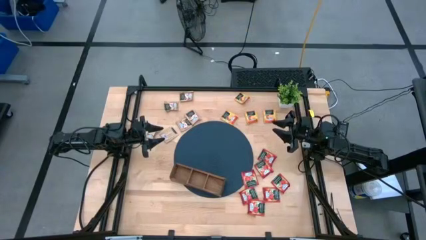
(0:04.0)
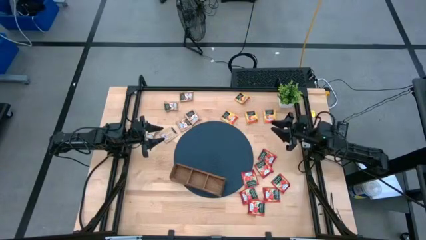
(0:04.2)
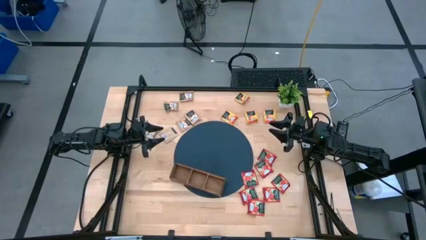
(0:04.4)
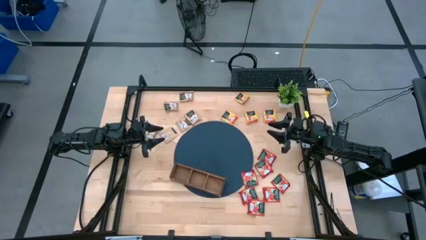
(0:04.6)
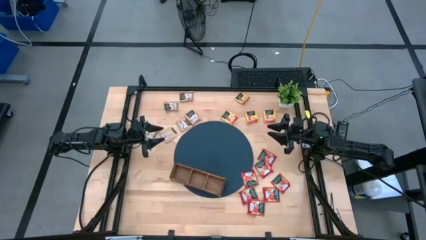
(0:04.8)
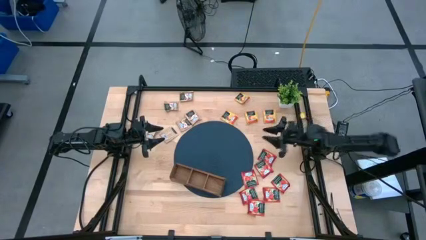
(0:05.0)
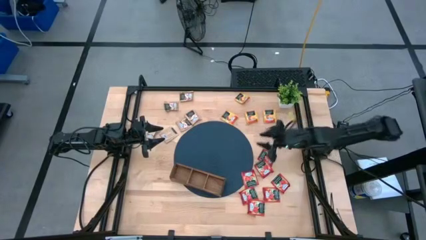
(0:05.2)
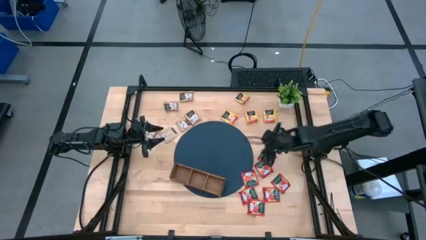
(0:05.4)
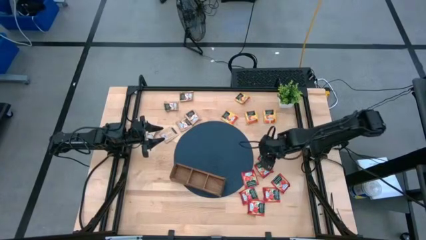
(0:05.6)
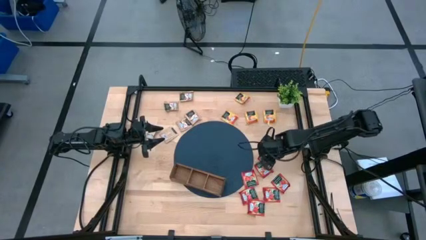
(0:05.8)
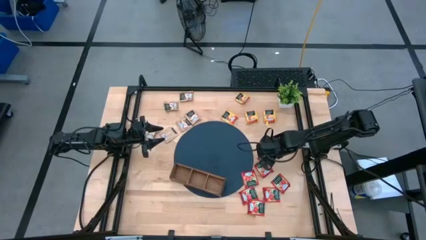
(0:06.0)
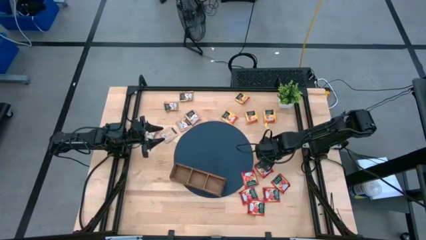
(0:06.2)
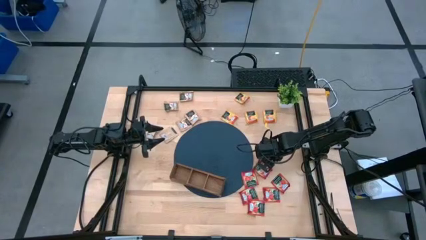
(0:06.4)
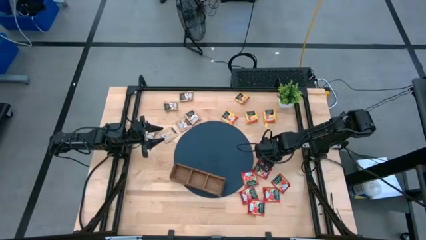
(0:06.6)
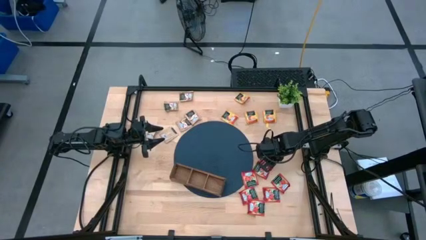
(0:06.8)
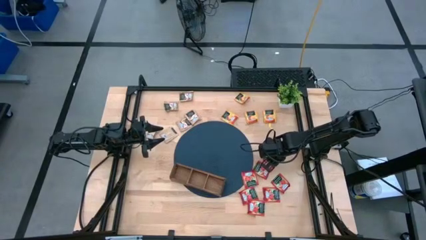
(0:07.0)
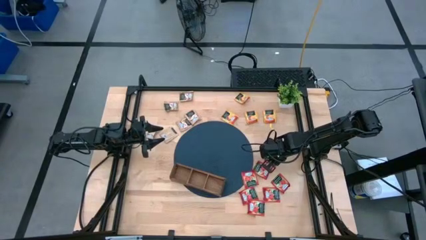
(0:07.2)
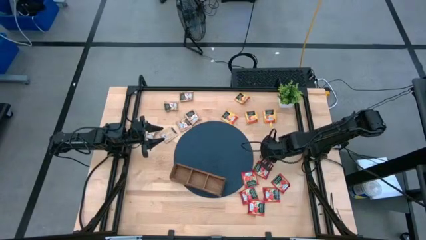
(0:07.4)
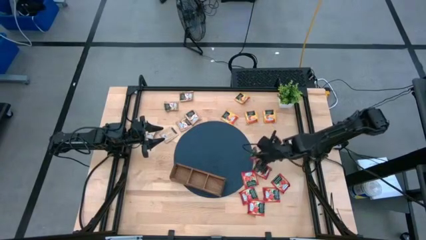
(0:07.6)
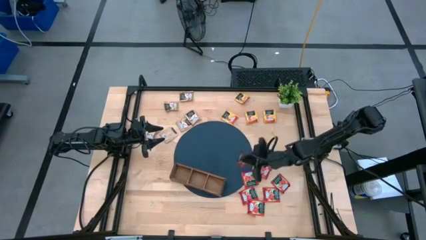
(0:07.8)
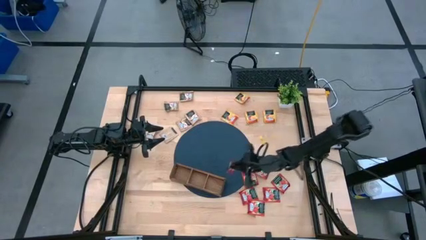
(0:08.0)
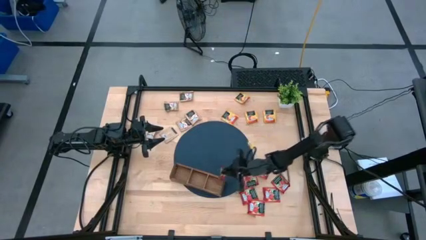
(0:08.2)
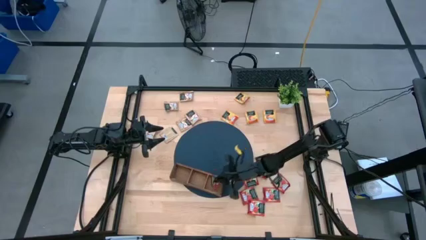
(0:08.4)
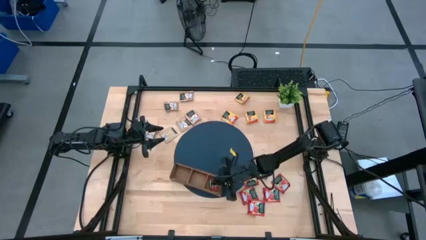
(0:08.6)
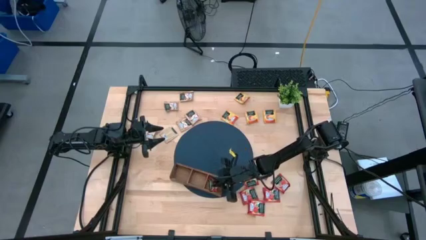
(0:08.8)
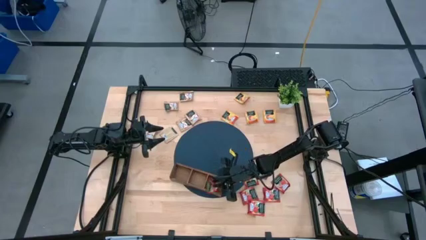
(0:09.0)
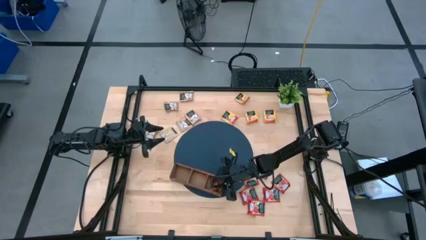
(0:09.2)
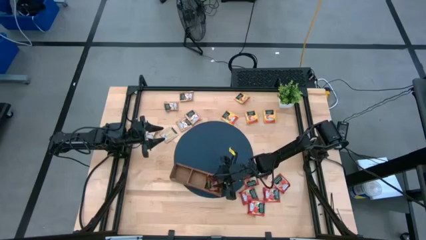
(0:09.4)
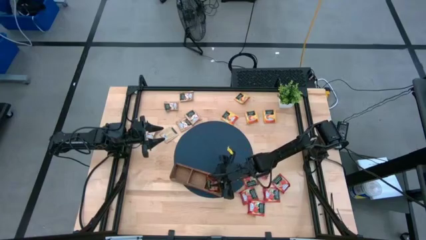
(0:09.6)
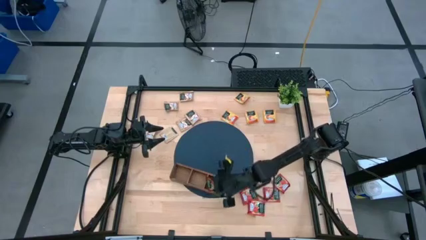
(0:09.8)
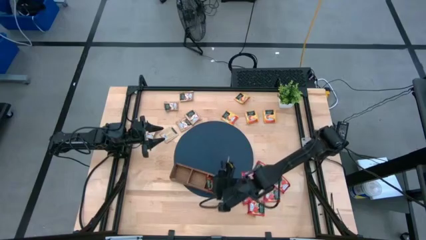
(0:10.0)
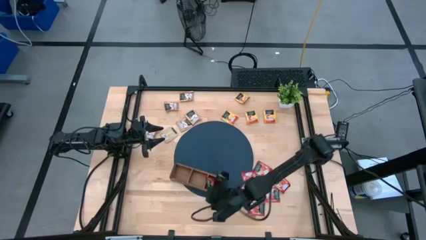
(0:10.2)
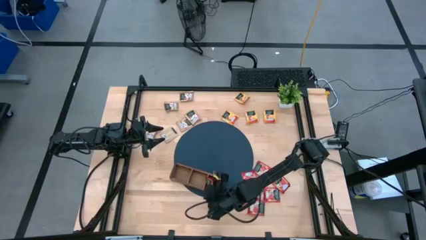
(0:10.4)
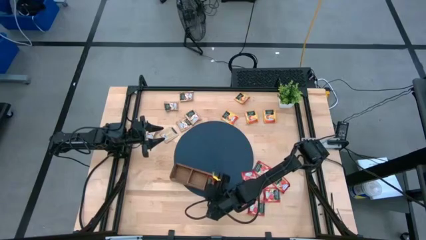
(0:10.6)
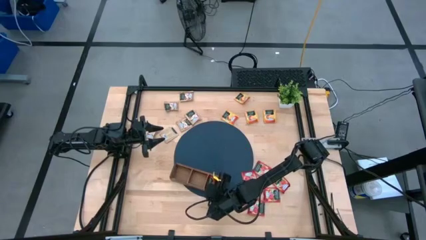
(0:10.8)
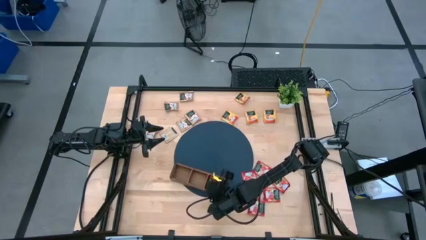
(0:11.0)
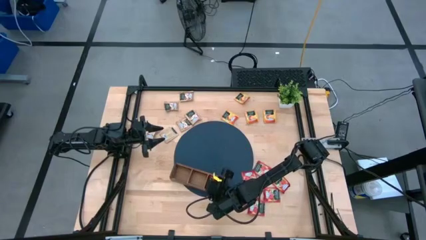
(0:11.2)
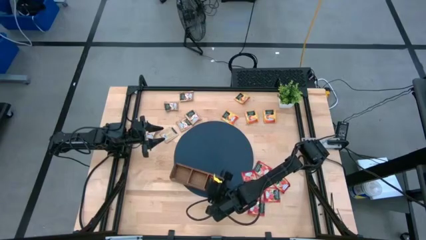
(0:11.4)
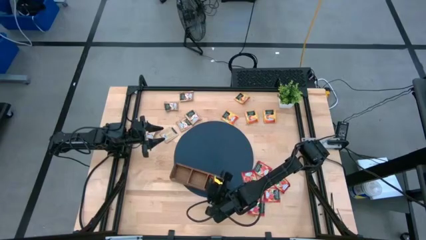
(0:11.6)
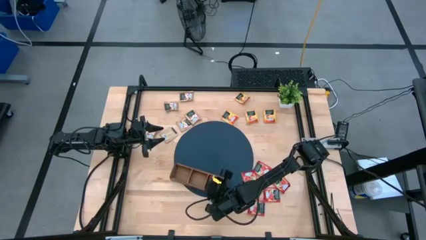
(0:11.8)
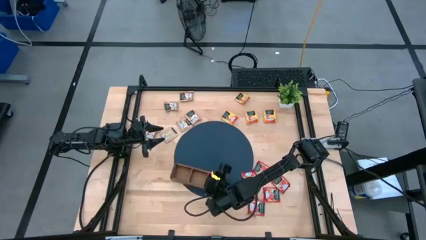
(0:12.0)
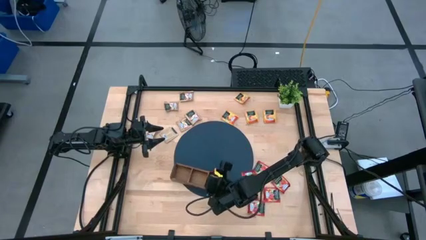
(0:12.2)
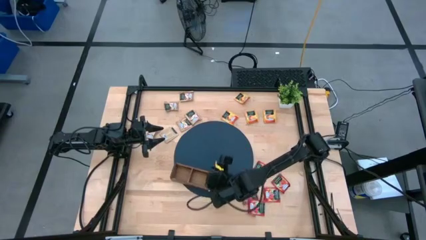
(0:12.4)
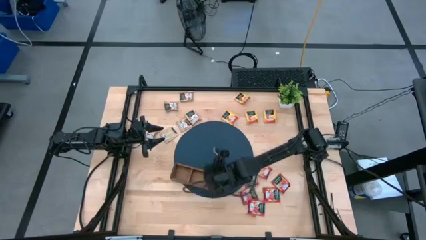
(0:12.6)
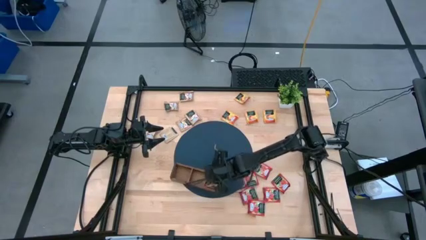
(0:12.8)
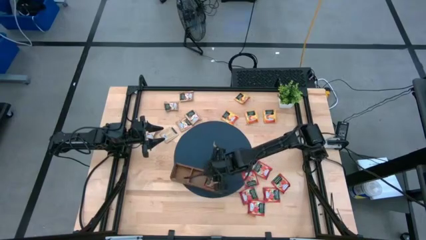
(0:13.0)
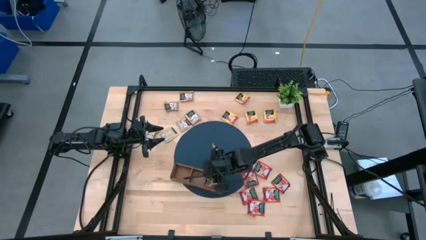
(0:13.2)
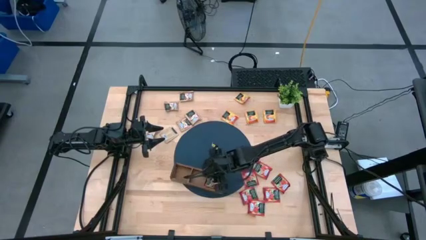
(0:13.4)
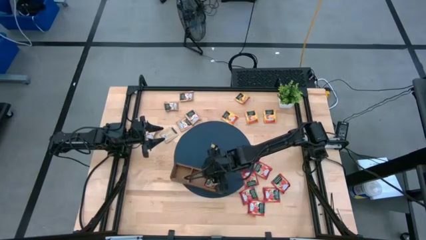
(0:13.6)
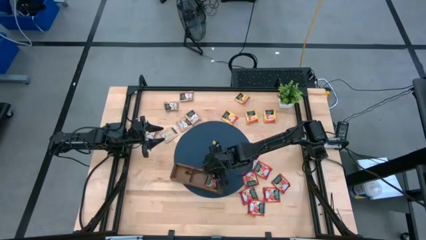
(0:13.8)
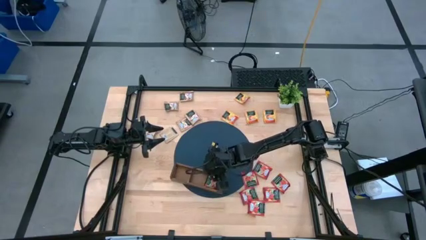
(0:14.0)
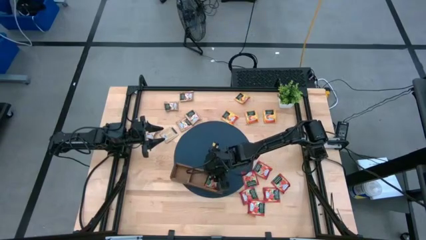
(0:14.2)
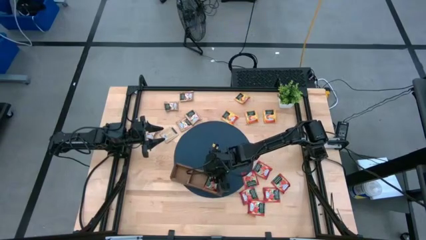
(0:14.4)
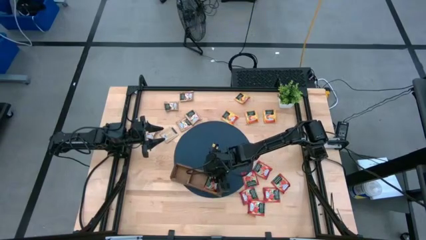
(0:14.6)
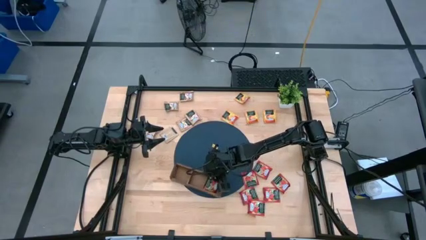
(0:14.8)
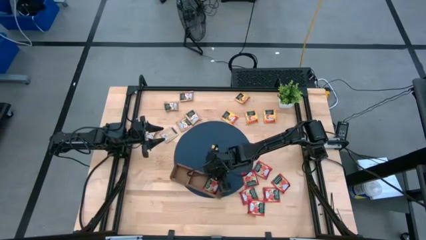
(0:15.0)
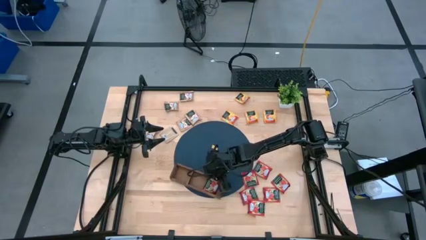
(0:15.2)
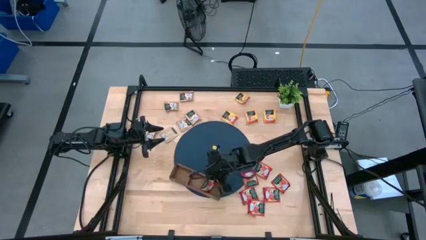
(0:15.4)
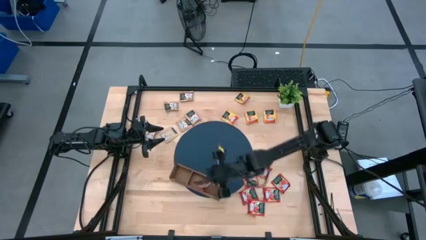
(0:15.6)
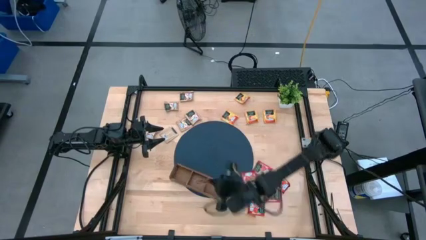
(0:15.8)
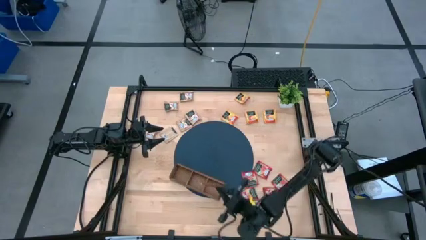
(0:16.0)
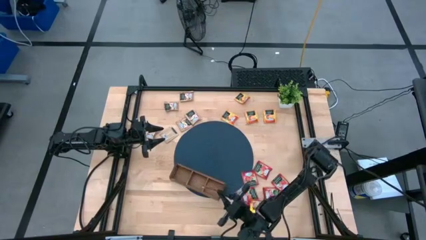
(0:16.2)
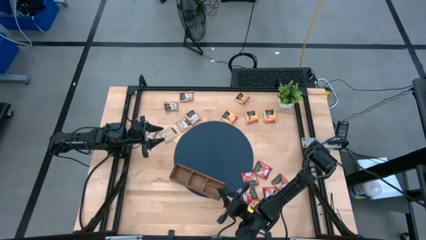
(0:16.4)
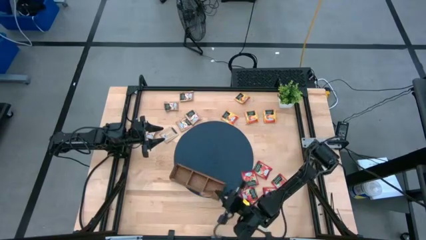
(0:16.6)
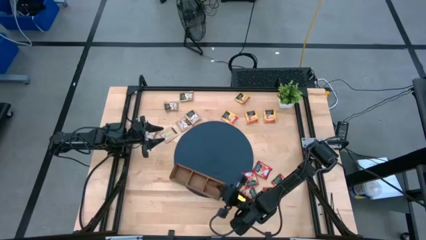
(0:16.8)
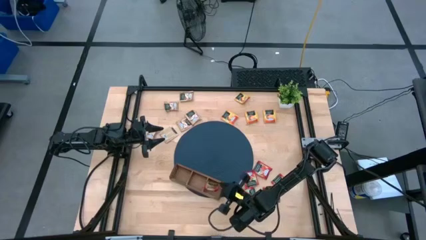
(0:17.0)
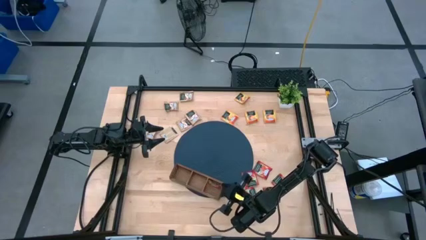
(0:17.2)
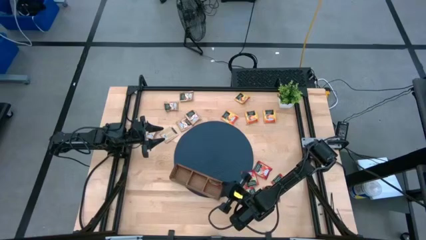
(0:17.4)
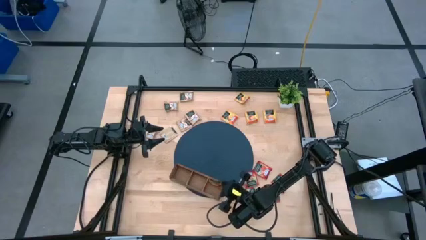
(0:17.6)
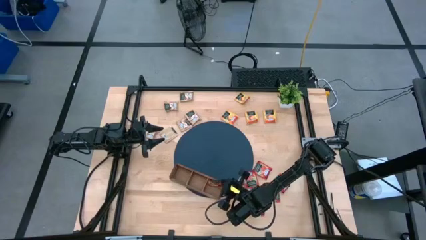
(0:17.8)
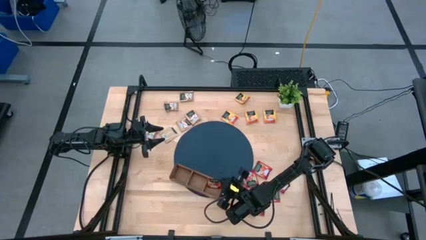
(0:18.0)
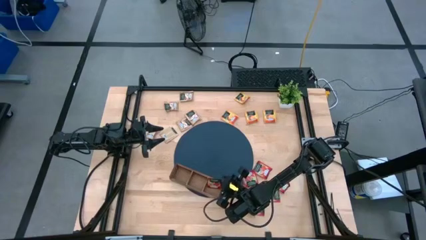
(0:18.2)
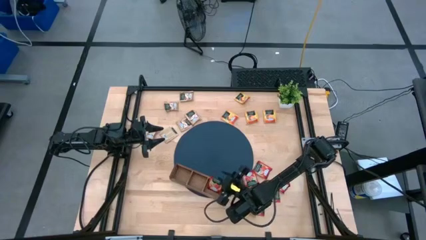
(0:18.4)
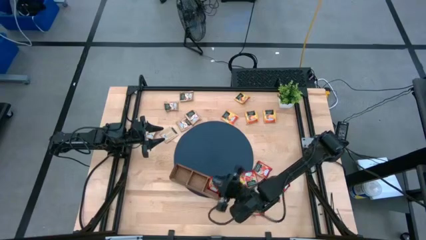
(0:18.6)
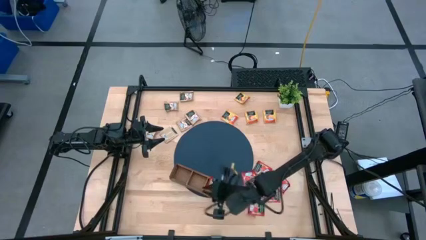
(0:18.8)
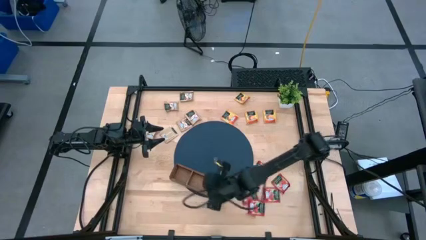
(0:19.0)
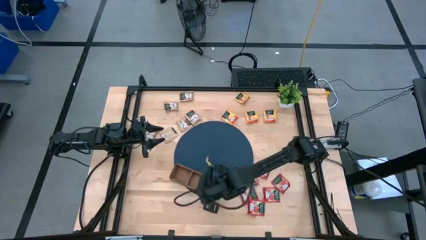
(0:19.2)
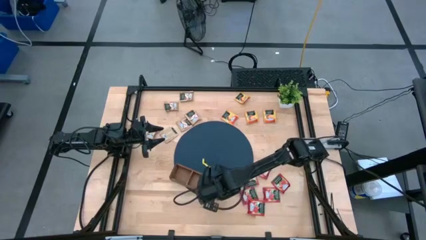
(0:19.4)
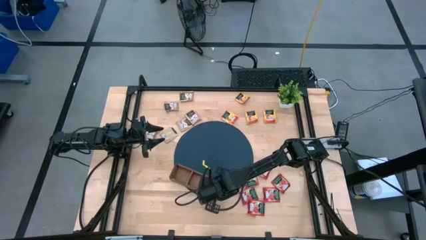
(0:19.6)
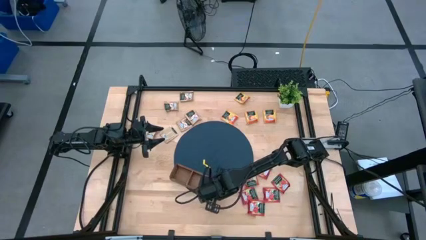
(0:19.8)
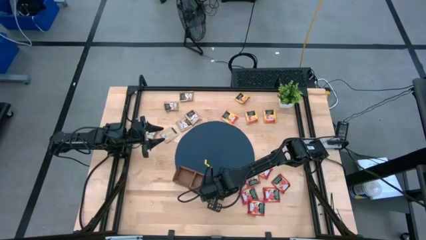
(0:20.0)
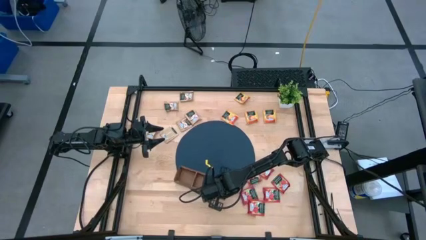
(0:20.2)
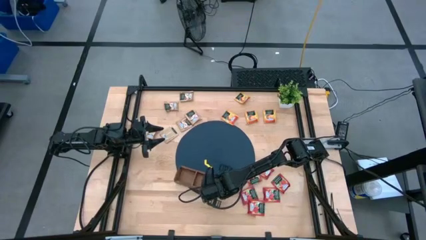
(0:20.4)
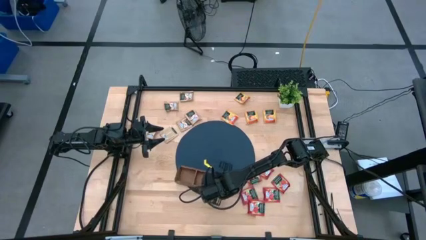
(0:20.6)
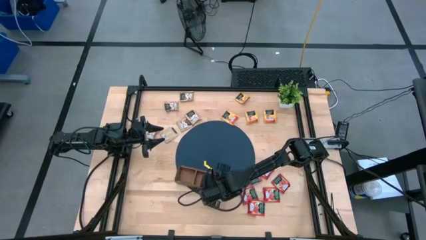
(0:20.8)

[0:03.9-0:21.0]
Task: Pick & Place Tea
Put the red tea bag into the right section of the wooden organizer
